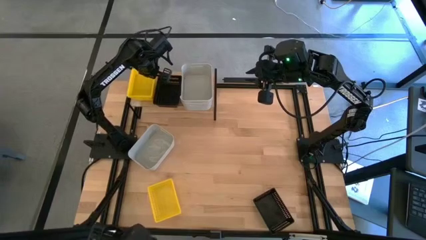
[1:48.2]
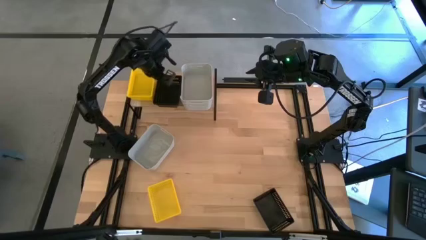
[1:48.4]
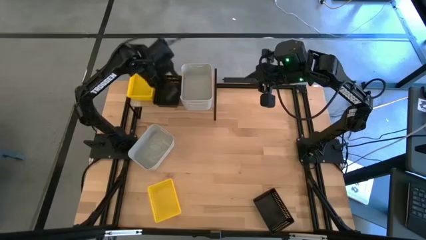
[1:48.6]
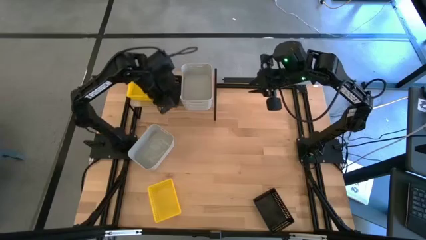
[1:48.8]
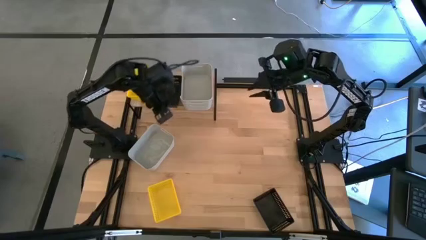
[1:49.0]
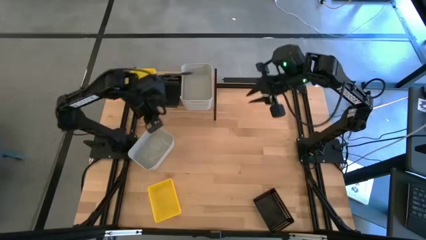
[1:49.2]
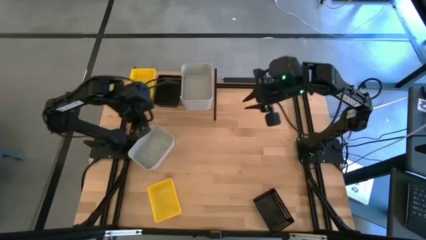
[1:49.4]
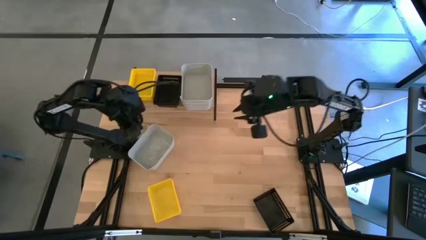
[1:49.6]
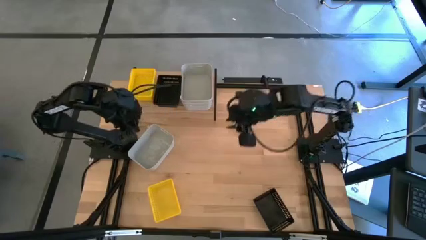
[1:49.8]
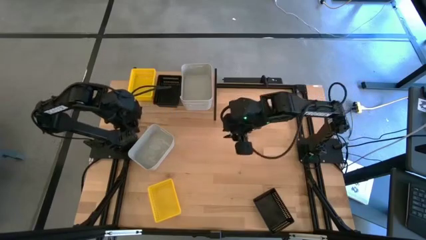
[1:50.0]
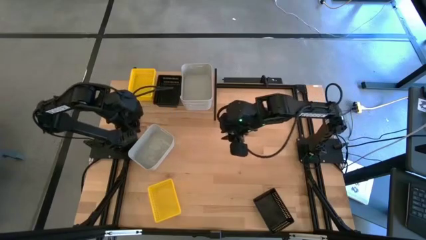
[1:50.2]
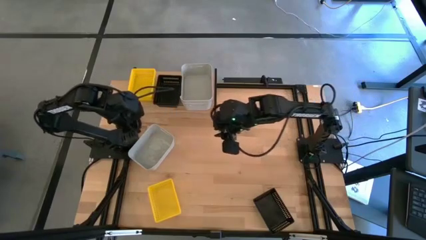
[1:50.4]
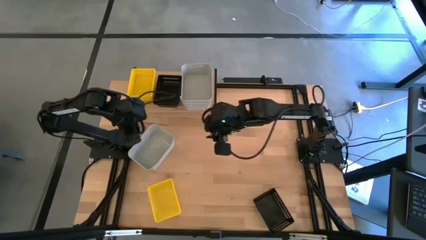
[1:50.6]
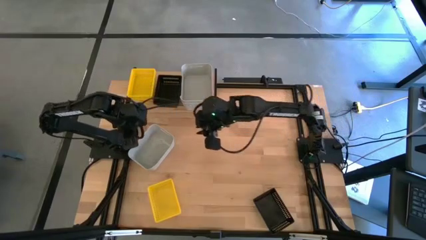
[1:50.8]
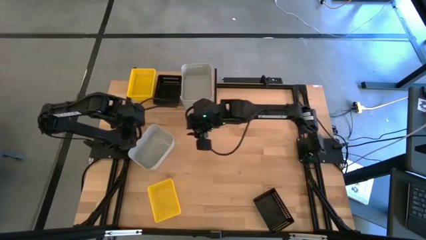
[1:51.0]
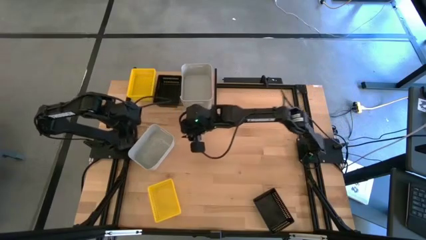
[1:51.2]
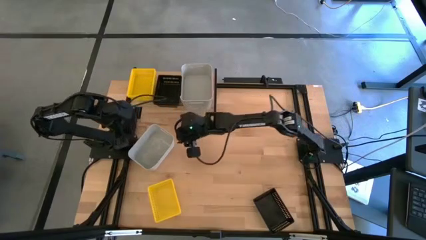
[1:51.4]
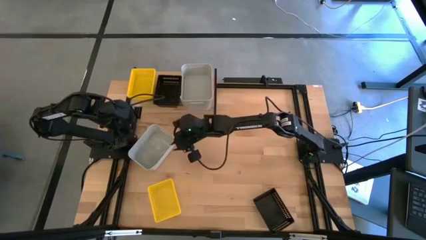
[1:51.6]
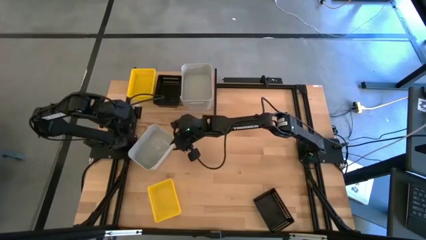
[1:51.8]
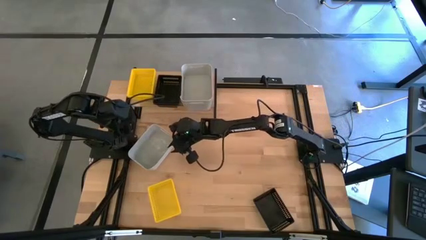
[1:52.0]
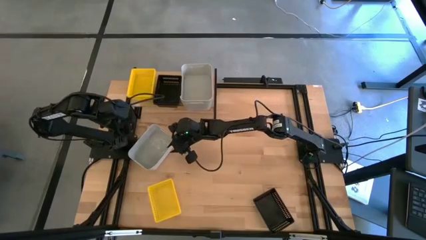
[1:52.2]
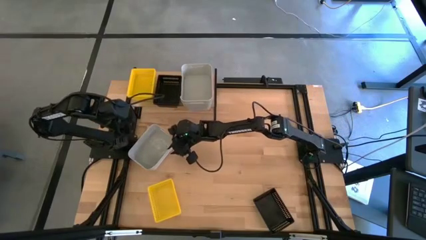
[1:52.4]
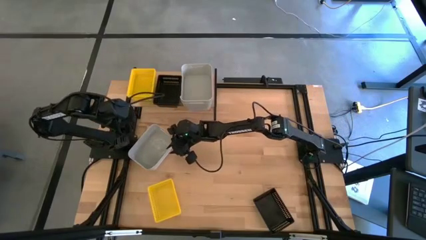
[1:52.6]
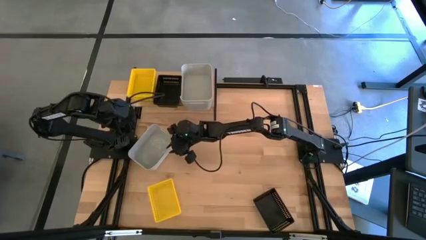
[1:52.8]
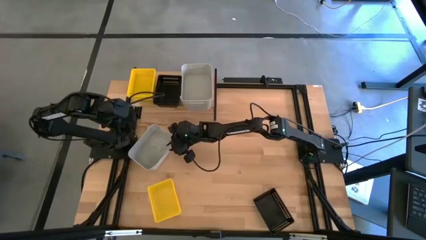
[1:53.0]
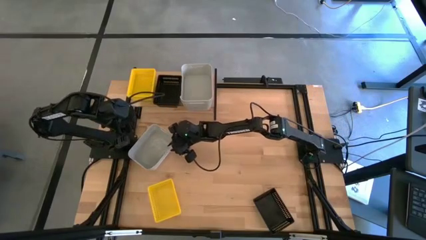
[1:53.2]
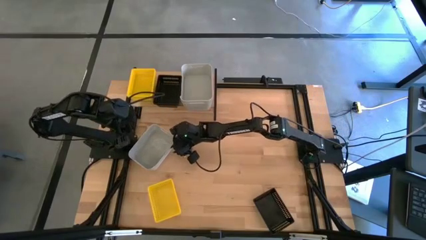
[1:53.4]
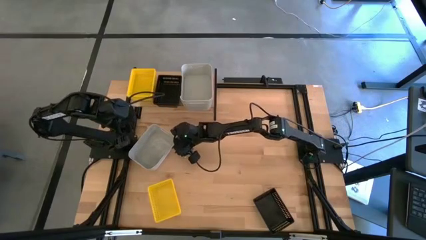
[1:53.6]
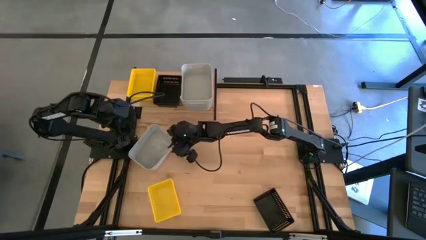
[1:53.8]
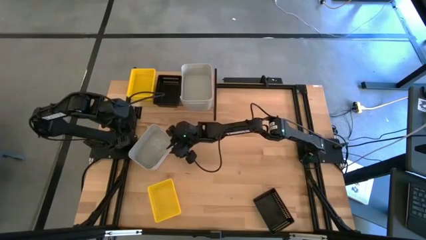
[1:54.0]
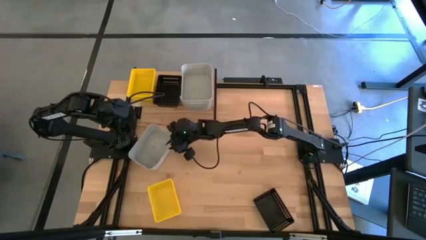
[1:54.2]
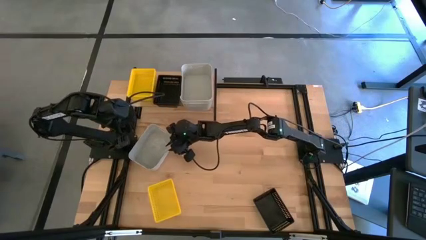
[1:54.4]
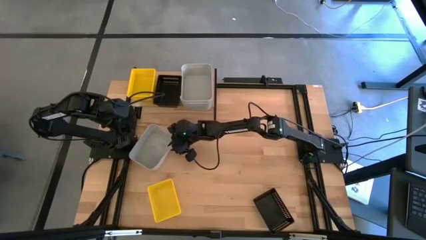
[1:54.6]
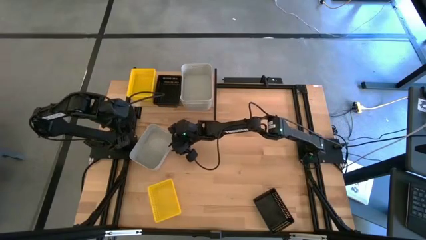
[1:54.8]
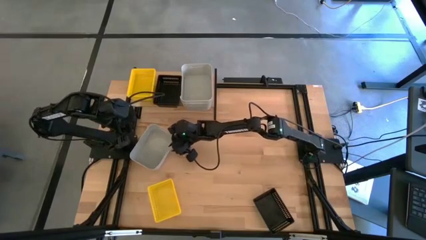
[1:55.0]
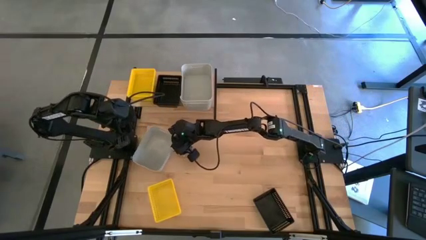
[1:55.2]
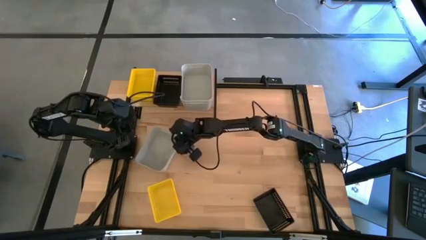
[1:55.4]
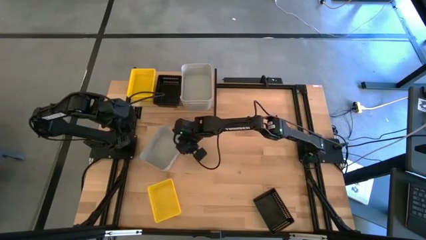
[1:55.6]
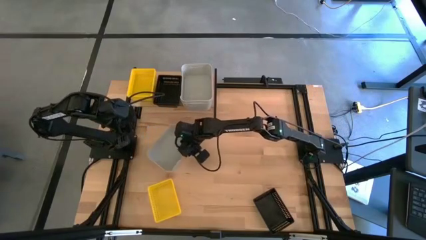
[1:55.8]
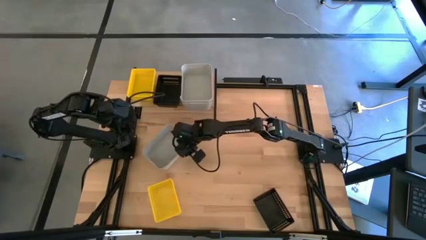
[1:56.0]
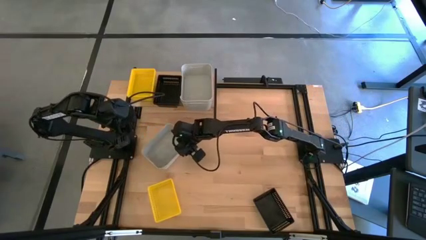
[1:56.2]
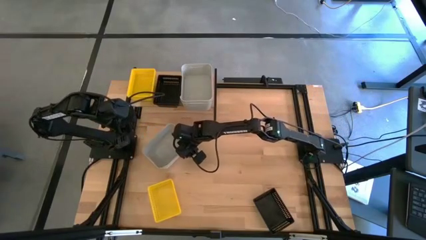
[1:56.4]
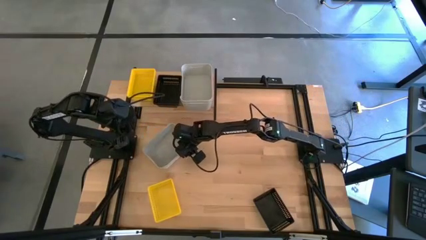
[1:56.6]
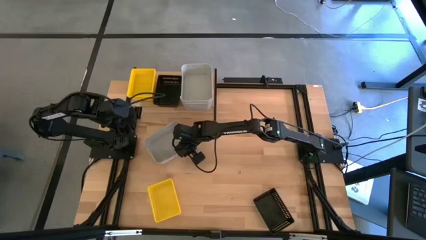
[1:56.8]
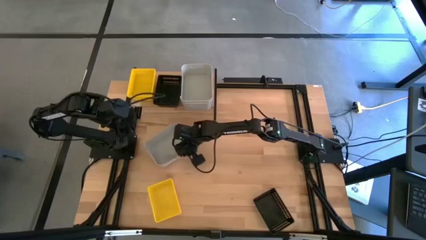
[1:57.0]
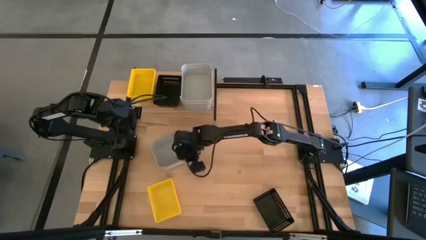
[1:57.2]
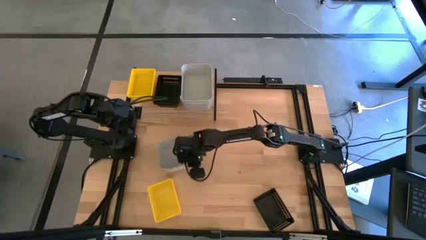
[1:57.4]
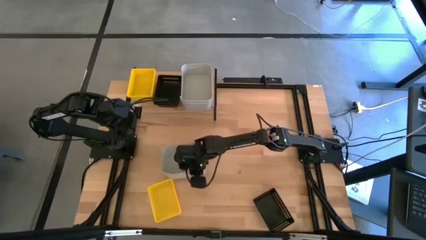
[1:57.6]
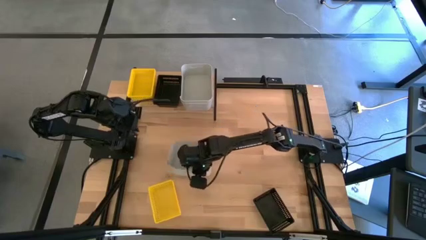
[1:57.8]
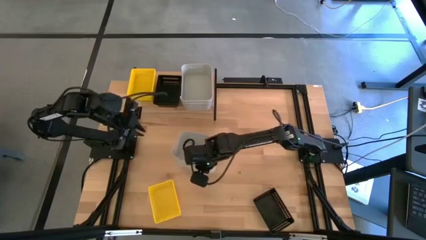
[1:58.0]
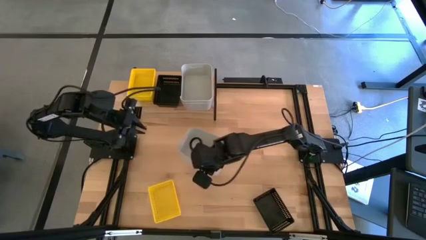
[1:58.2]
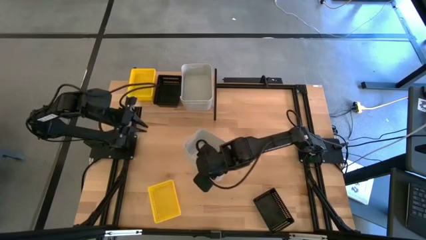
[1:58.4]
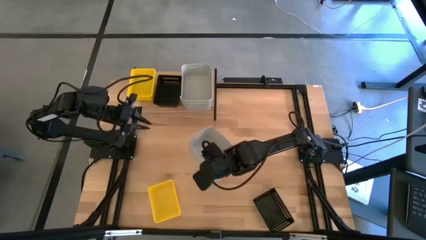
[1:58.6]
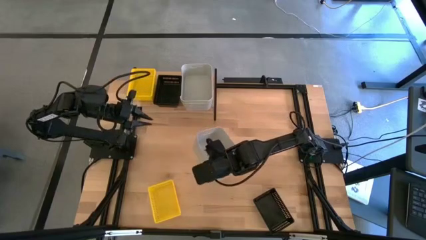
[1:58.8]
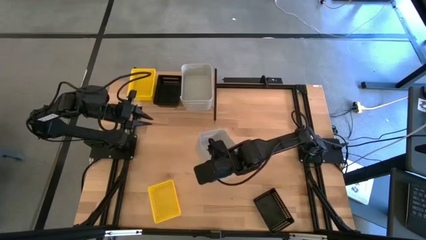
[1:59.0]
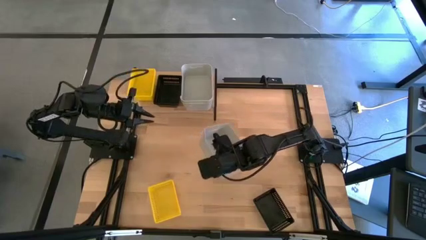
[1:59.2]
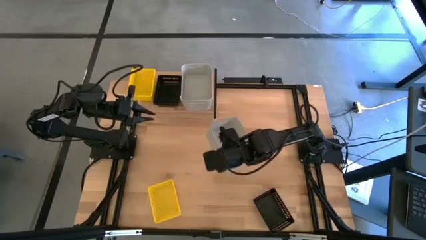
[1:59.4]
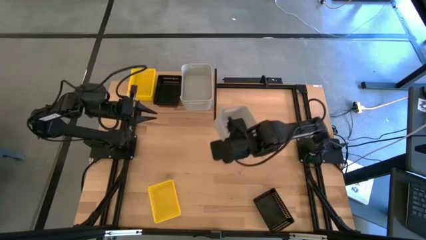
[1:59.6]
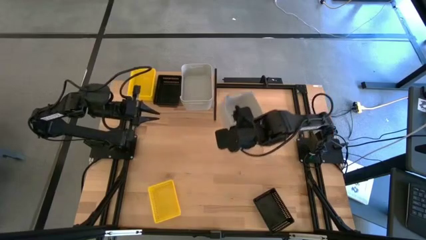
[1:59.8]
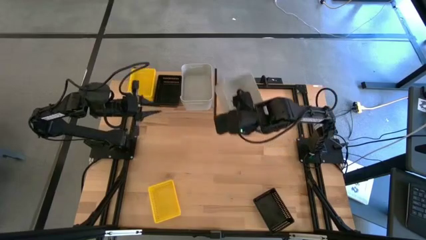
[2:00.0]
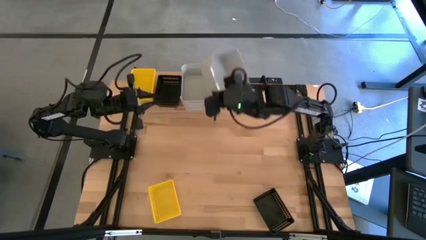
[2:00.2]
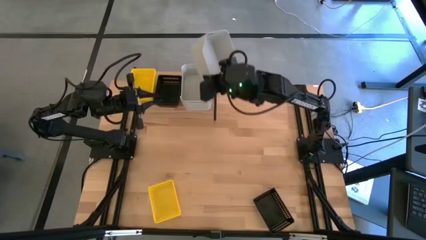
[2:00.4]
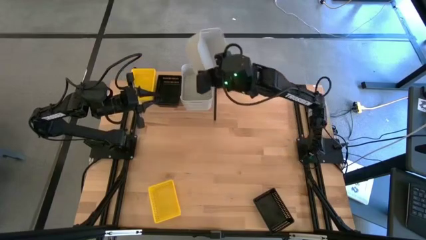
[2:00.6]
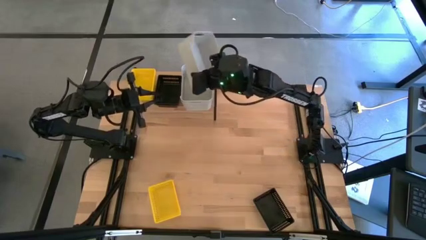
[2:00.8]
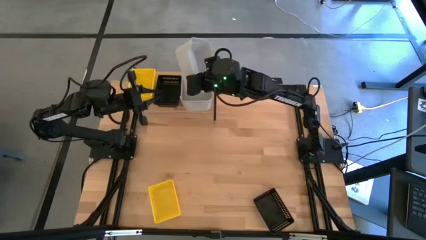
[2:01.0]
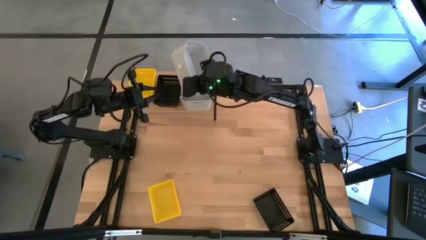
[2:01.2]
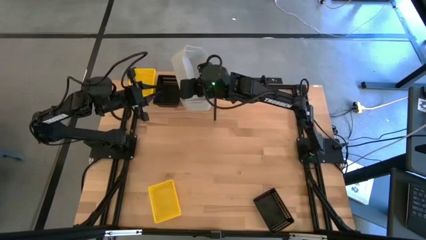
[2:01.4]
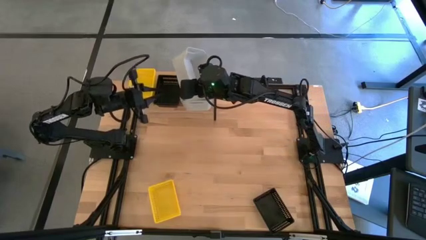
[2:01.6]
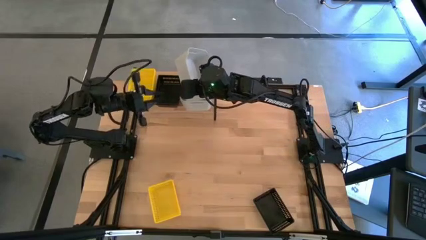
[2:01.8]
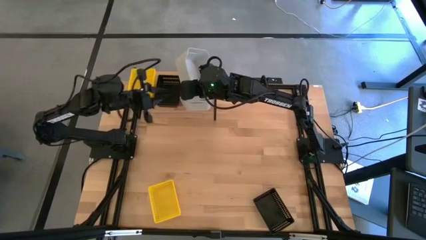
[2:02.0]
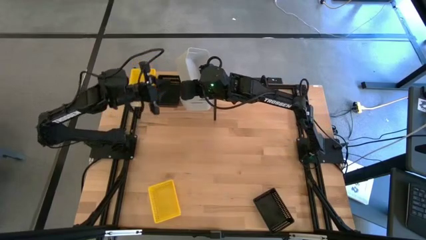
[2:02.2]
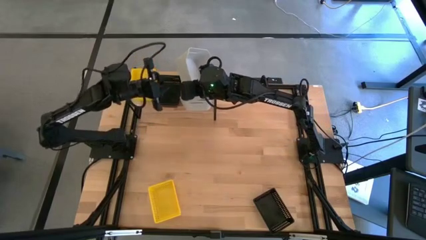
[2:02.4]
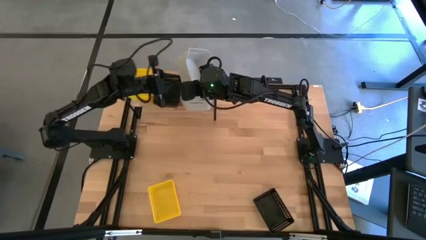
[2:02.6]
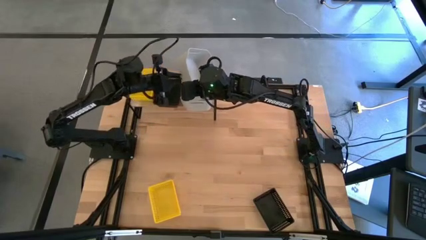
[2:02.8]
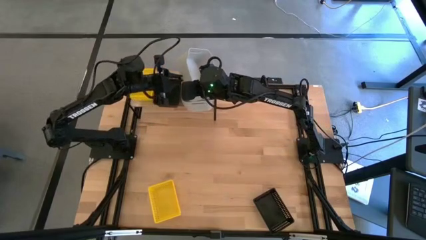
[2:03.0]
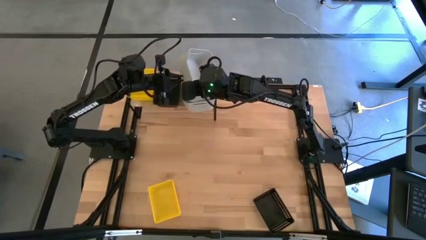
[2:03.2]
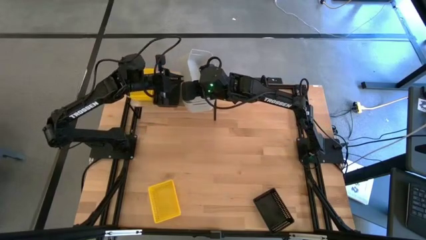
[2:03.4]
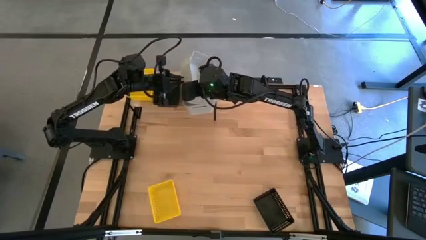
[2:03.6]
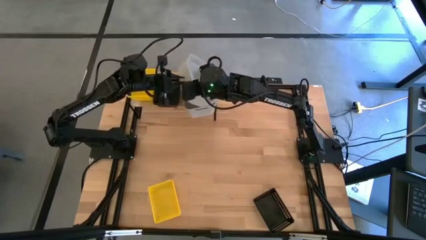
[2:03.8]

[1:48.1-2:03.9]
Task: Stack baskets on shelf by color
Stack the gray bin on top of the other gray bin on the shelf
